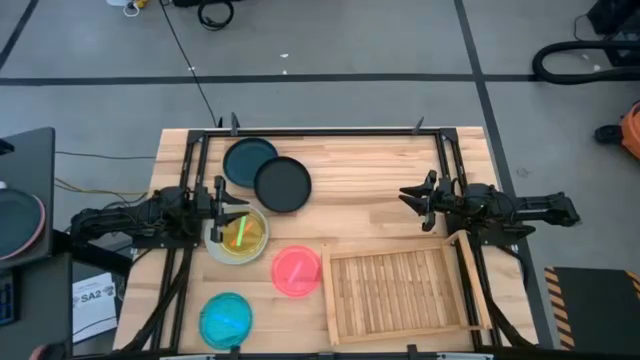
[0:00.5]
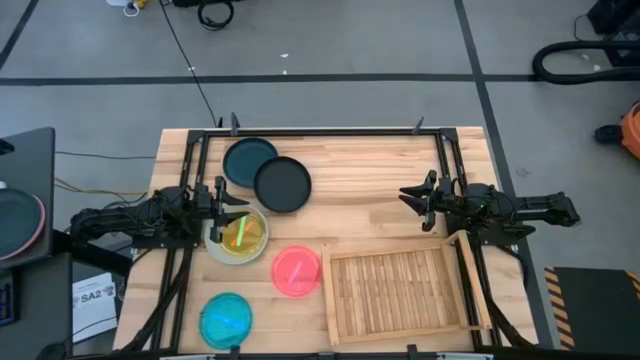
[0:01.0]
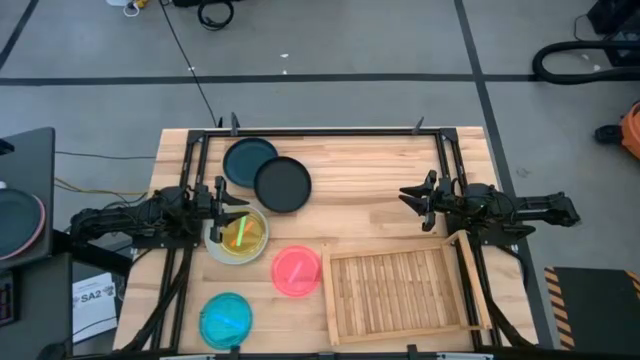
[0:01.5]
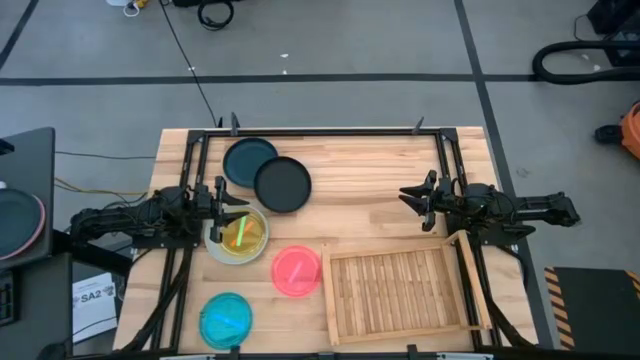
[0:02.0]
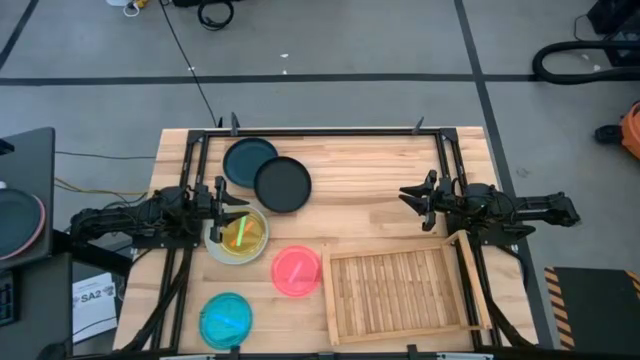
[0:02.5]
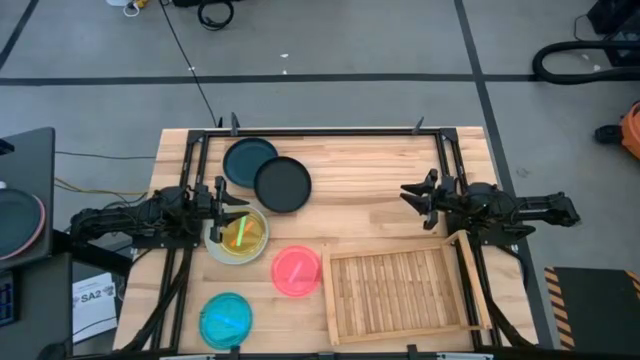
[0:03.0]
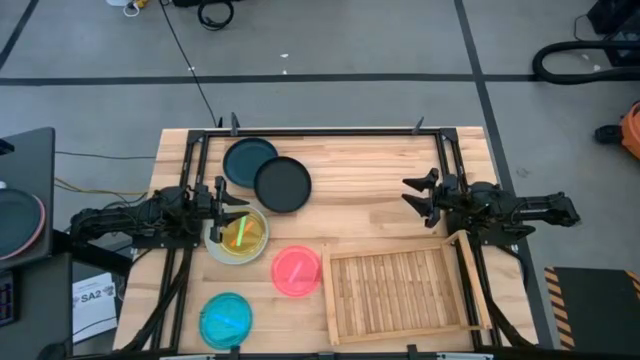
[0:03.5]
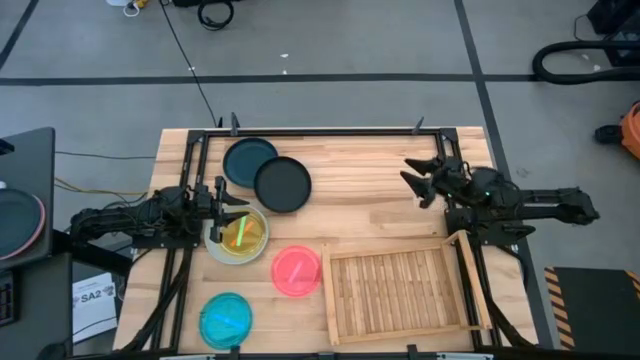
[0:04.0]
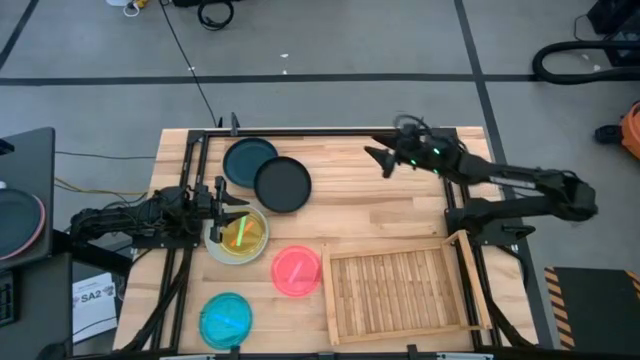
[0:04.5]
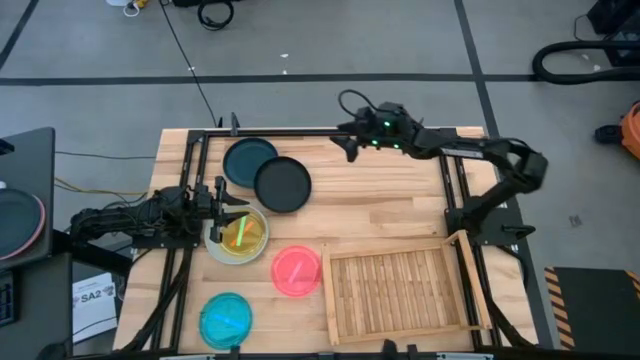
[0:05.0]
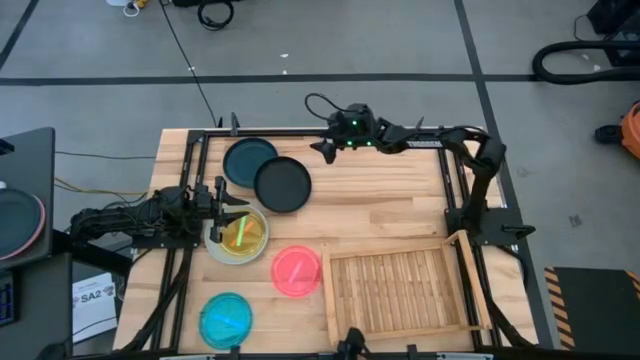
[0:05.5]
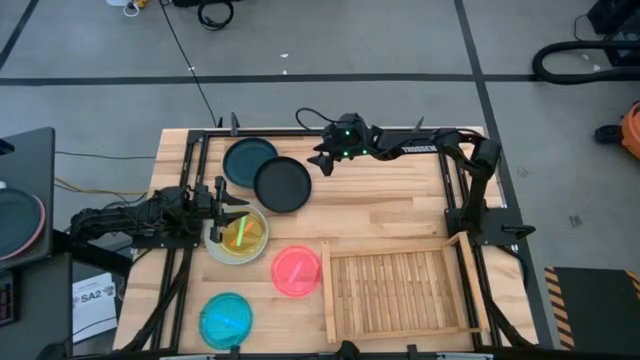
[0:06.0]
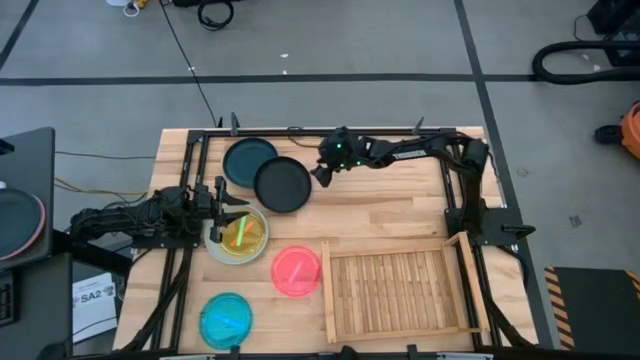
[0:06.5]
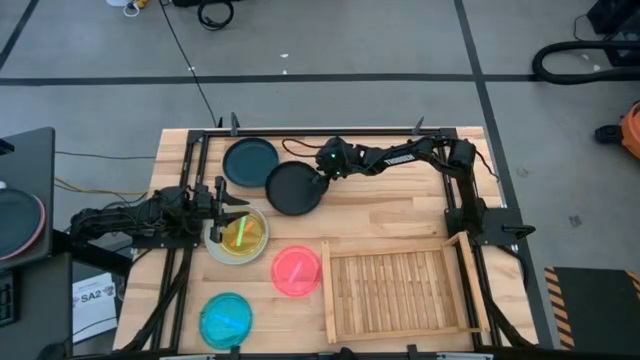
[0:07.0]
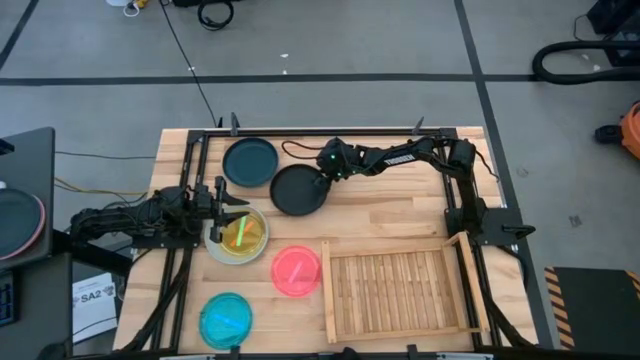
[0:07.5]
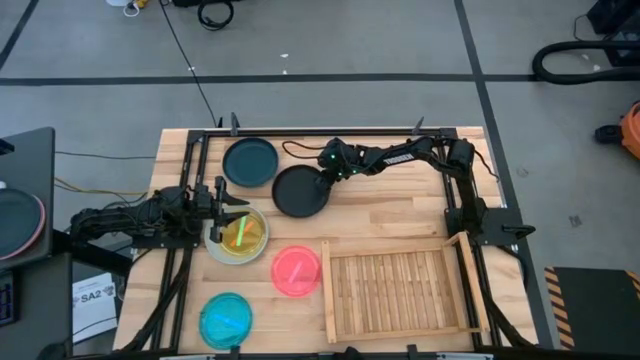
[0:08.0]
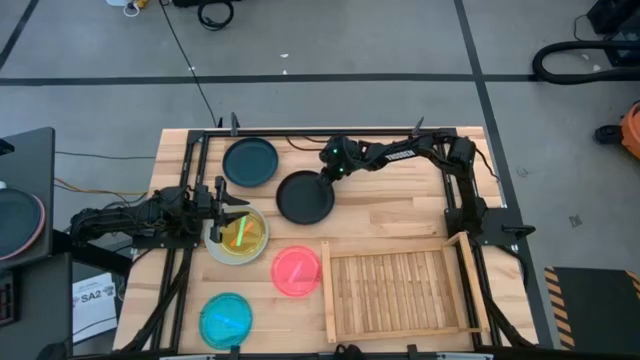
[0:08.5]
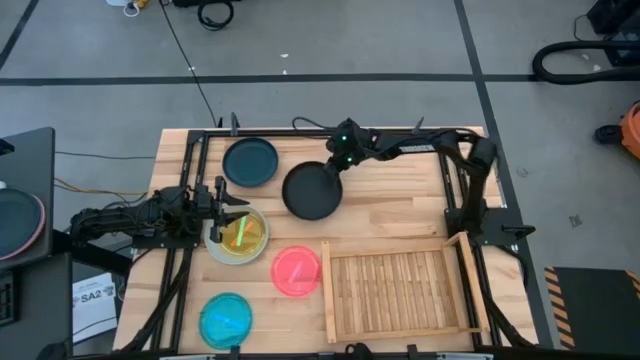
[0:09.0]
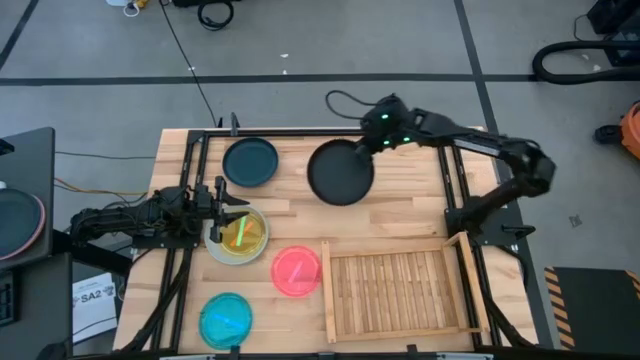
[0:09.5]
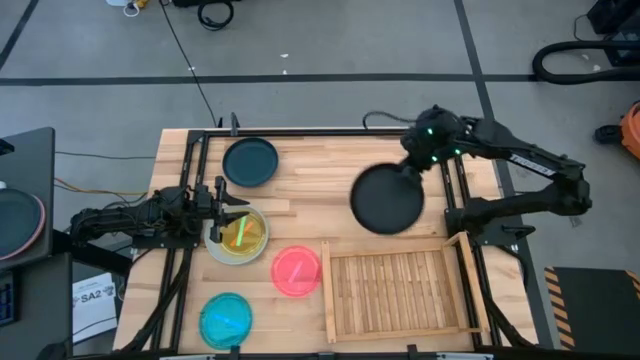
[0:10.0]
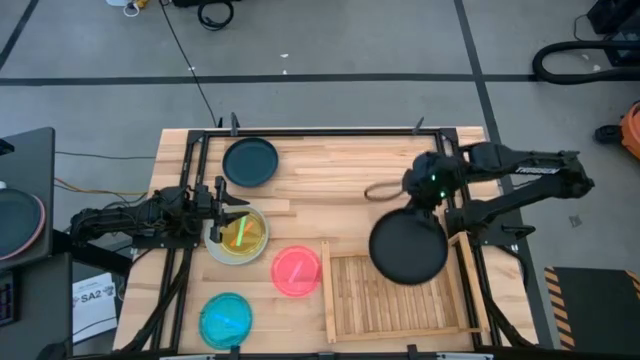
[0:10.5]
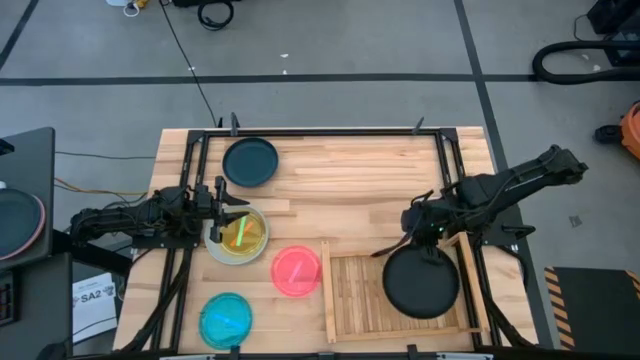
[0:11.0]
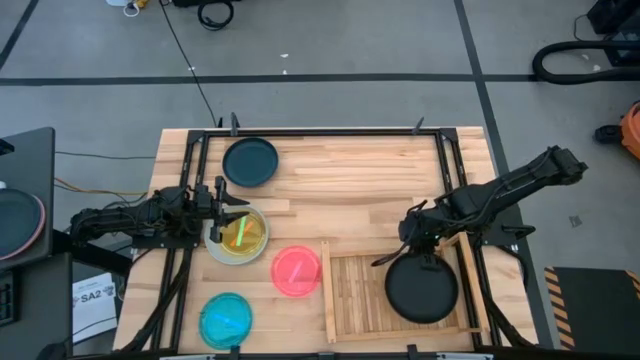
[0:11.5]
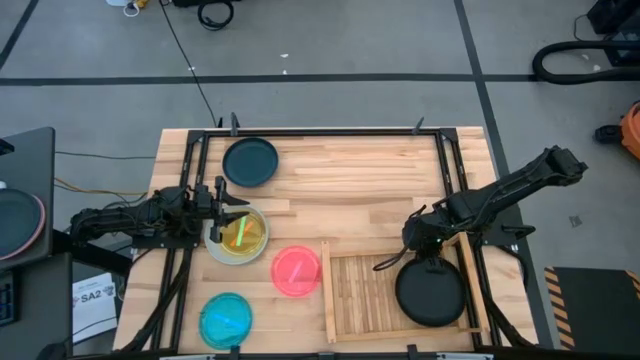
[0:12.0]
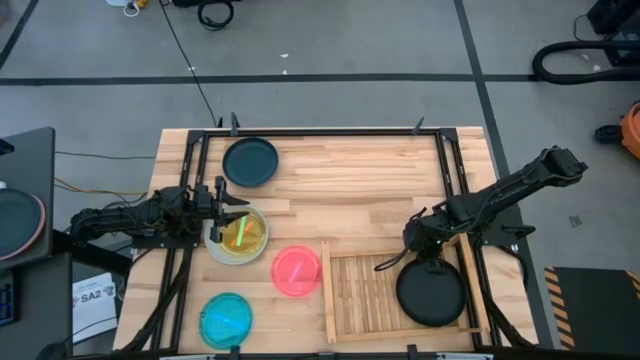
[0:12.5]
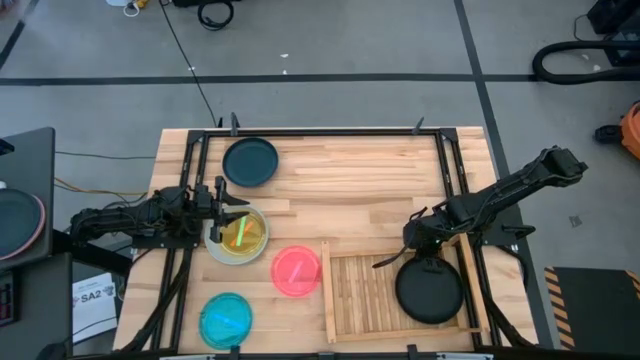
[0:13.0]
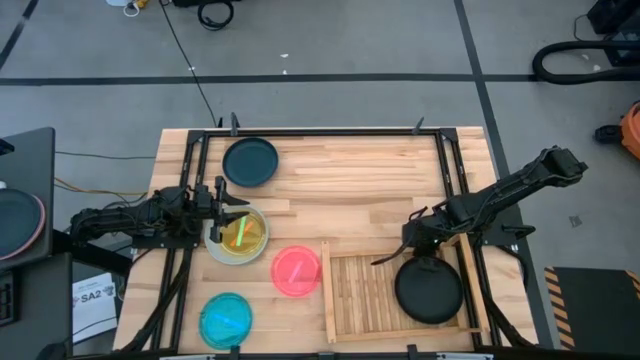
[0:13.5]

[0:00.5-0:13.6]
Task: Place and stack plates onto a shelf
Put the black plate on the shelf

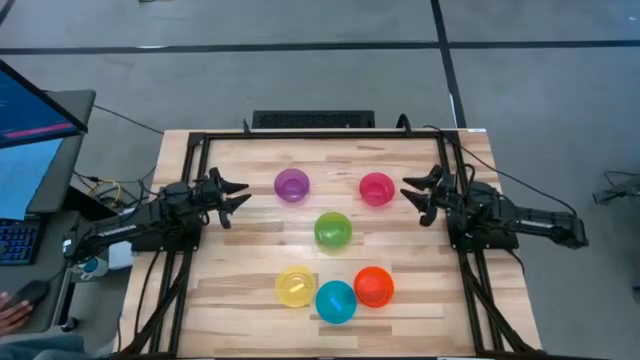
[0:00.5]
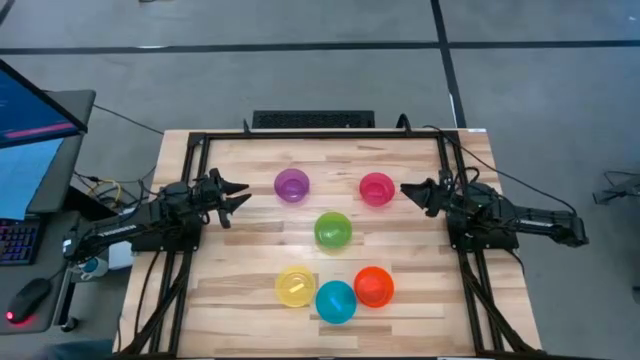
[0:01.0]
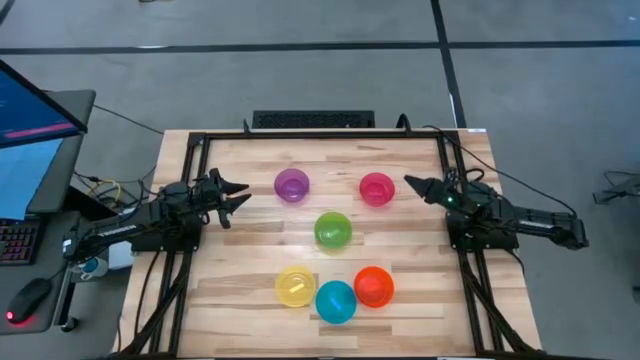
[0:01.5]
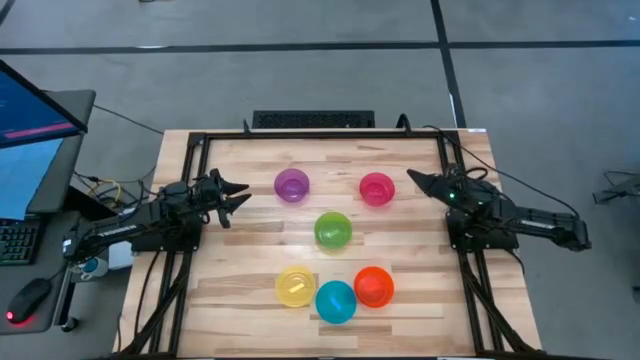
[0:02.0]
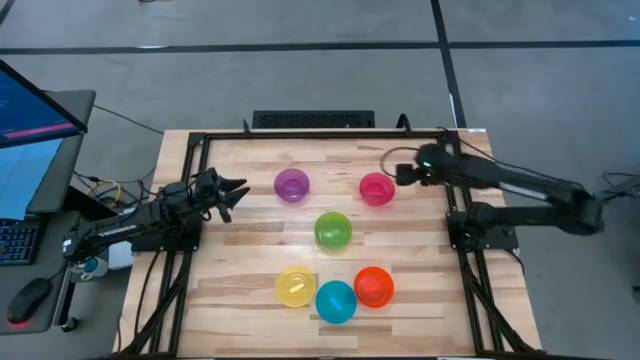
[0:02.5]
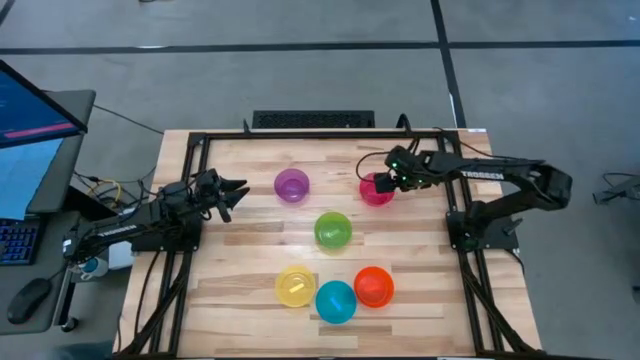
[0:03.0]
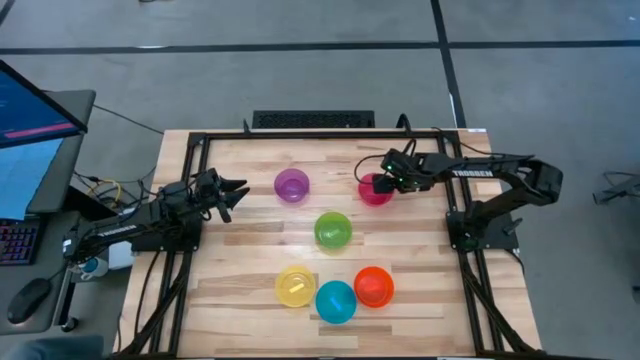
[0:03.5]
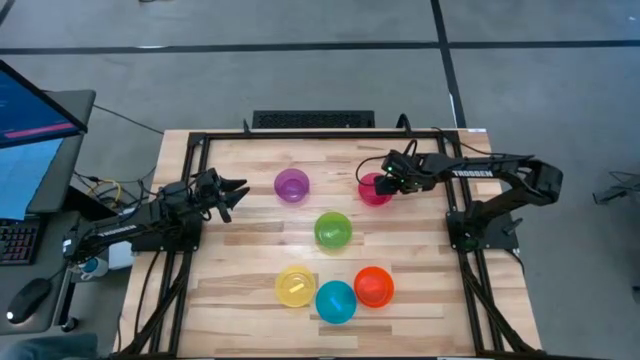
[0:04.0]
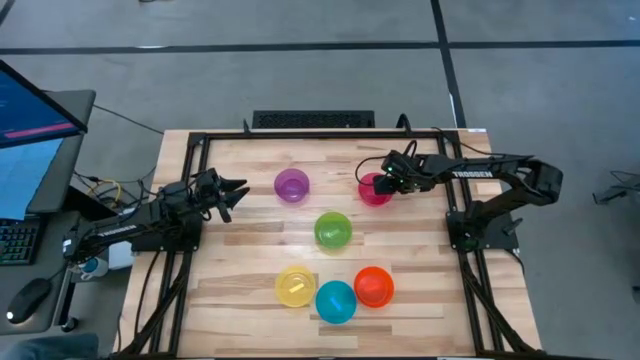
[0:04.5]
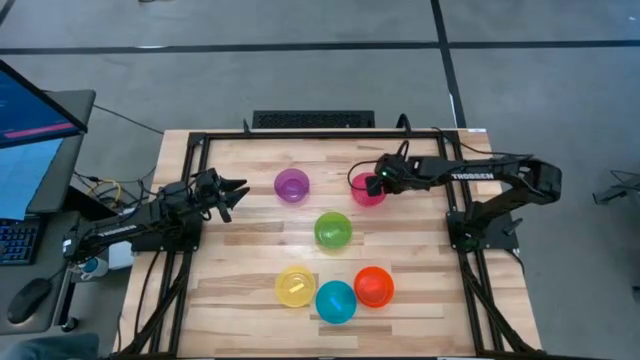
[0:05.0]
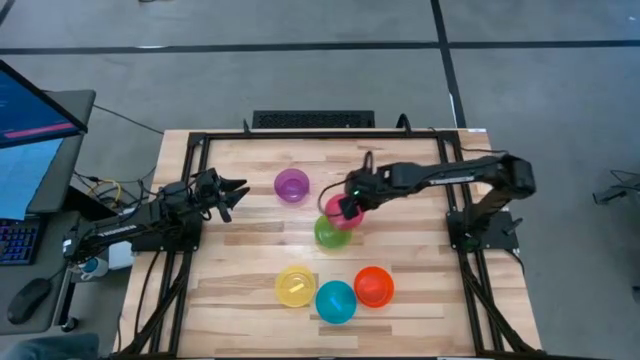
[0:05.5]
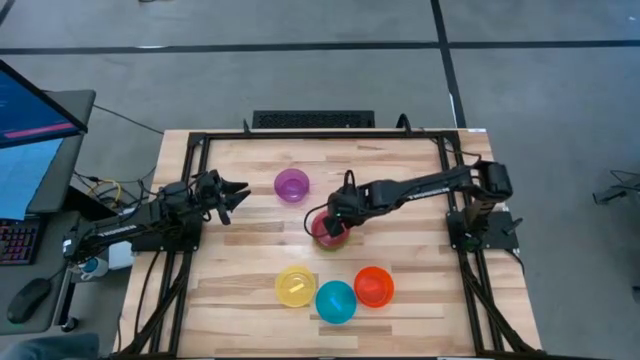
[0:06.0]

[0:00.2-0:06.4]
Task: Nest bowls inside each other
Stack the pink bowl on top of the green bowl

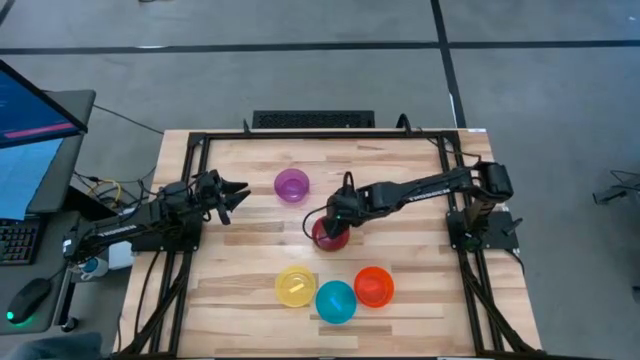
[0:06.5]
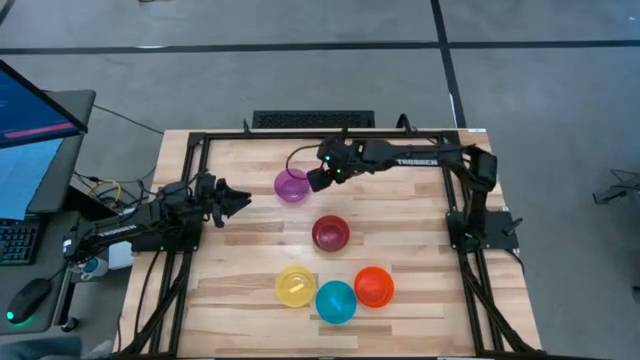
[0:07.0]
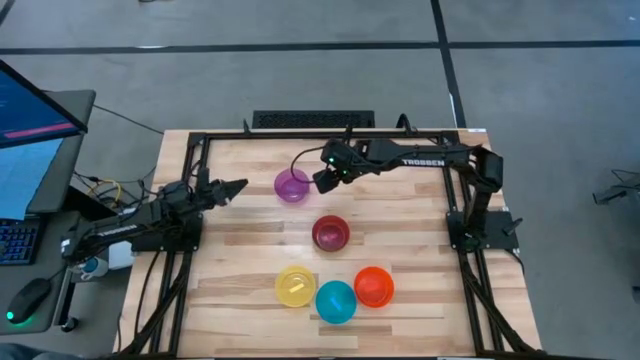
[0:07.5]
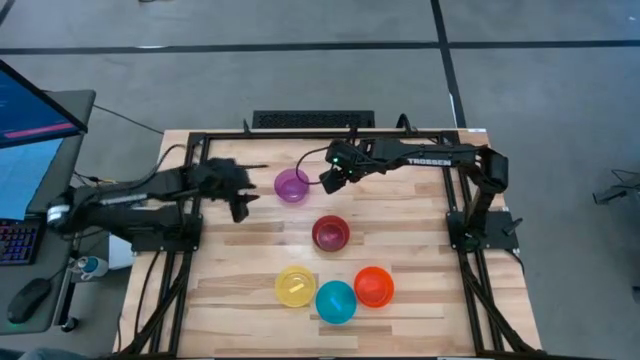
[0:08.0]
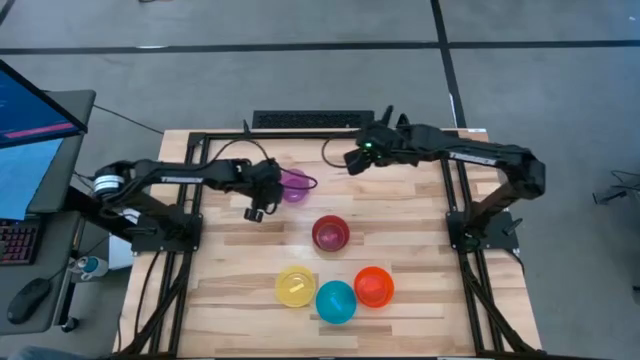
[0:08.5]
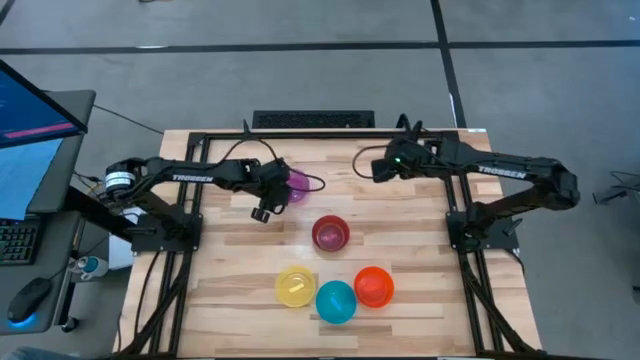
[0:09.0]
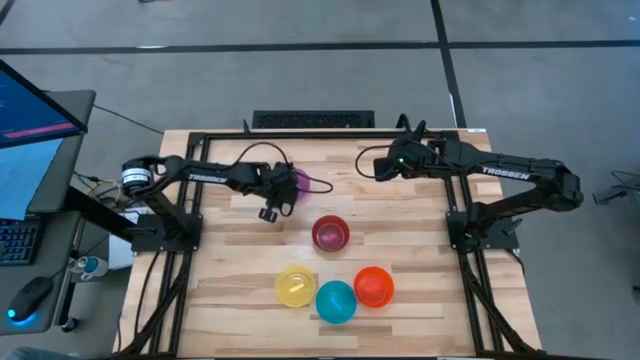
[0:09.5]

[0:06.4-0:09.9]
Stack the purple bowl on top of the pink bowl
